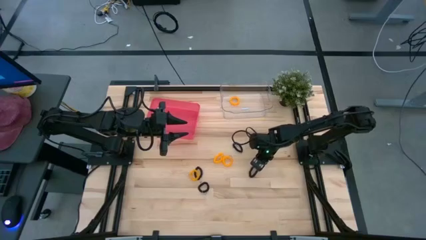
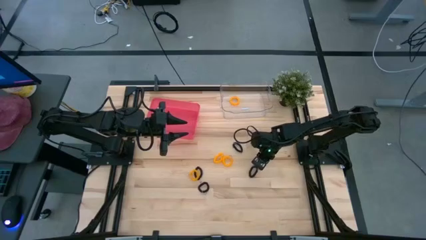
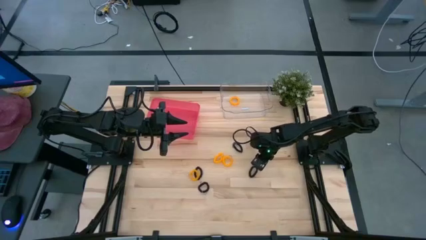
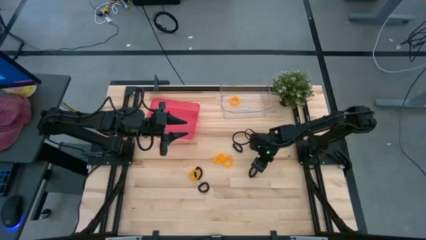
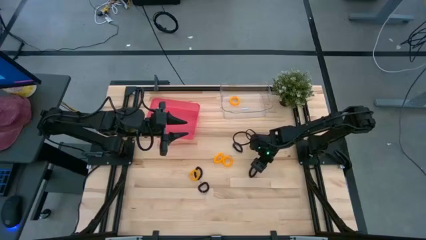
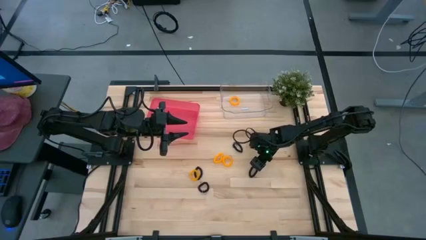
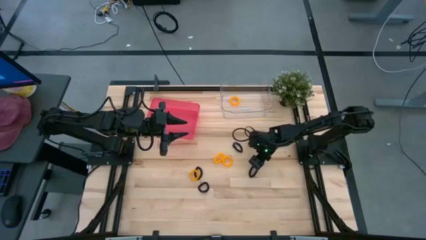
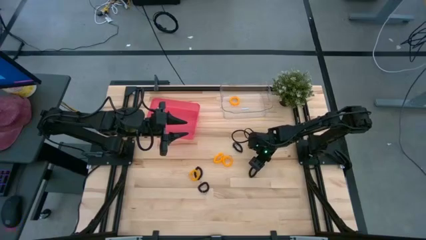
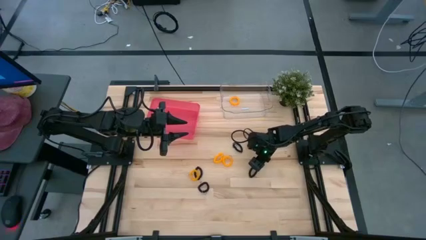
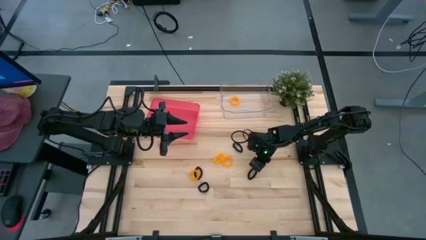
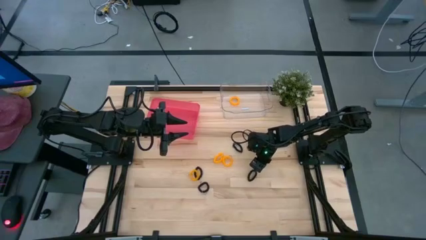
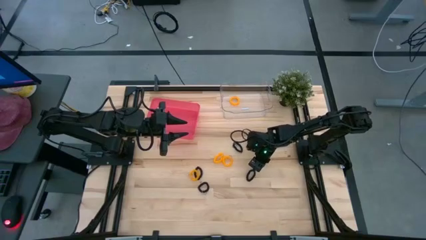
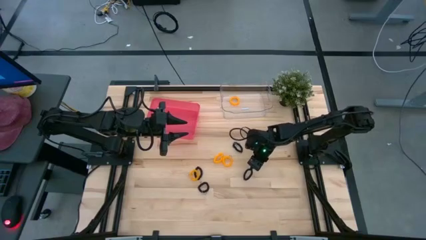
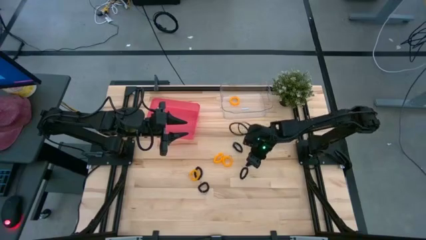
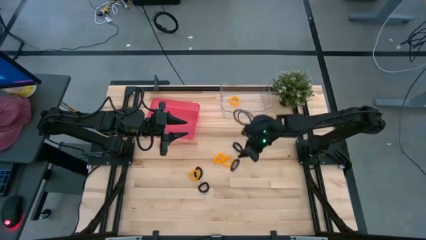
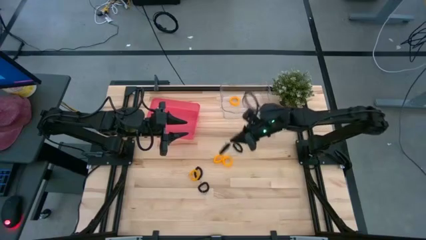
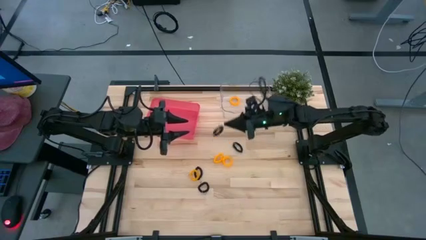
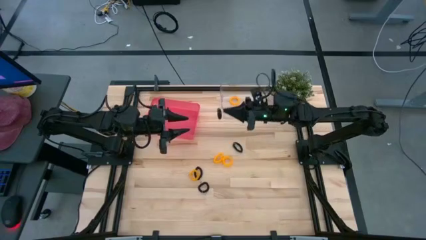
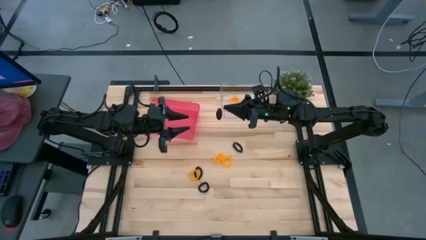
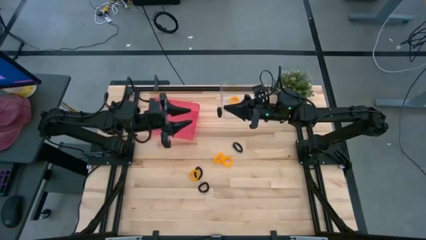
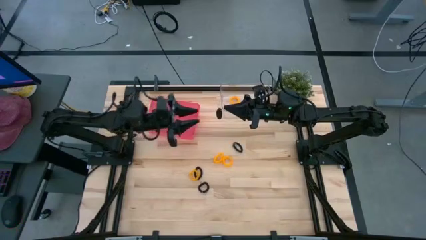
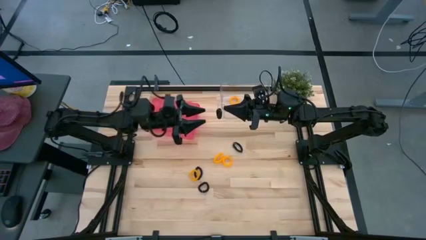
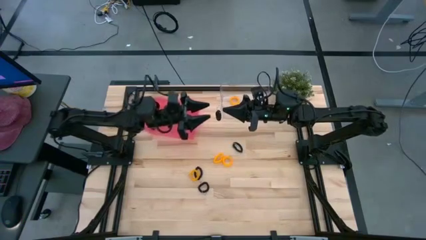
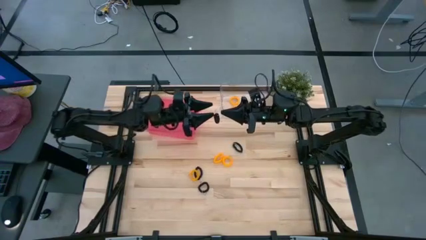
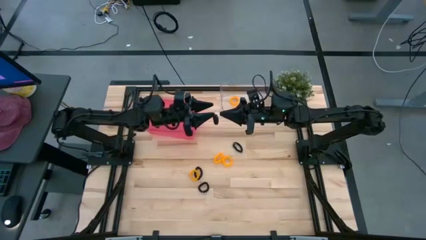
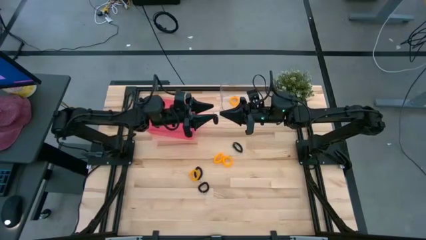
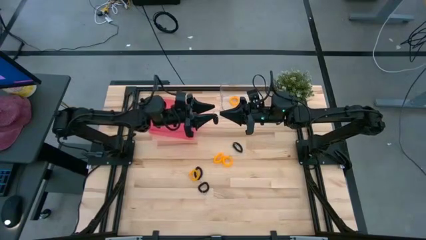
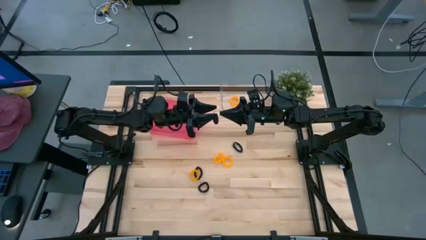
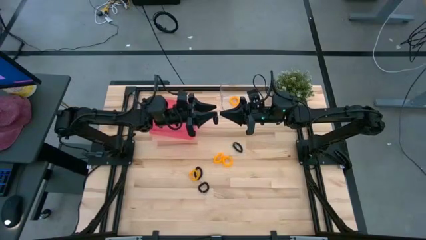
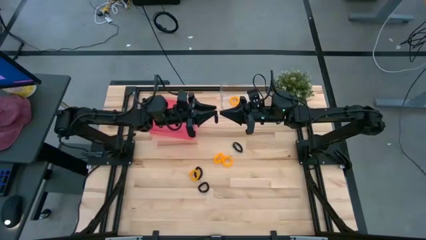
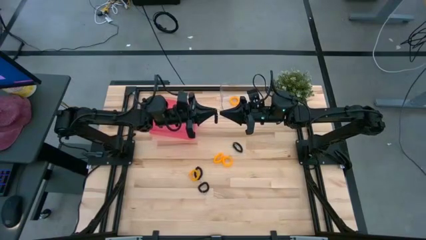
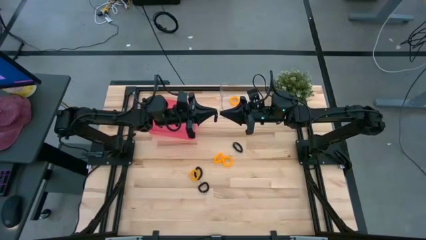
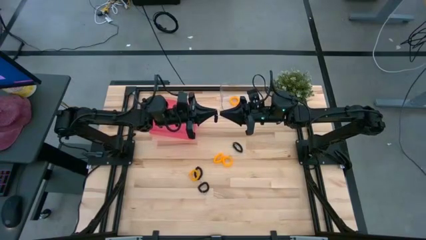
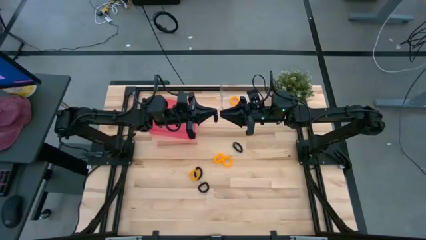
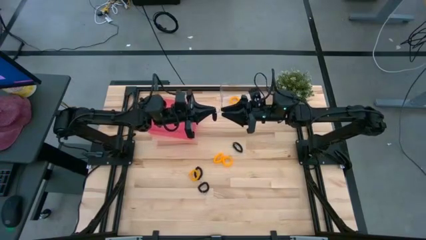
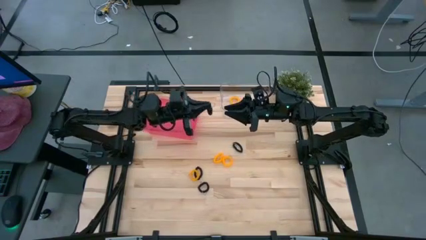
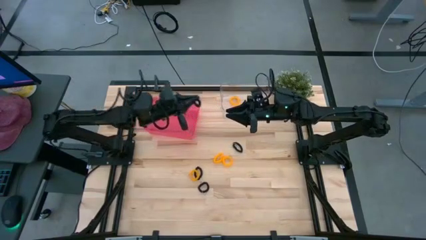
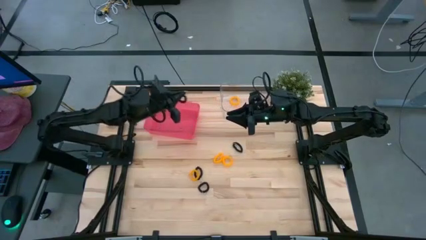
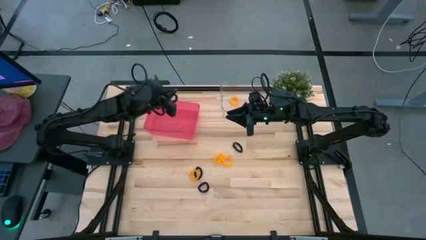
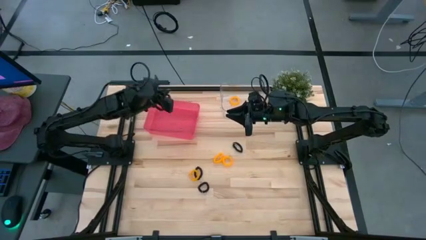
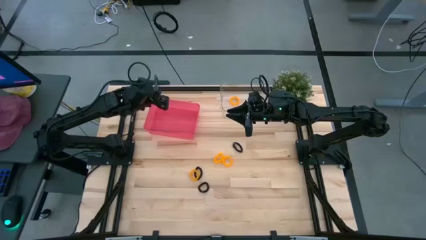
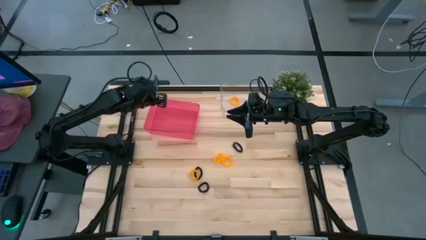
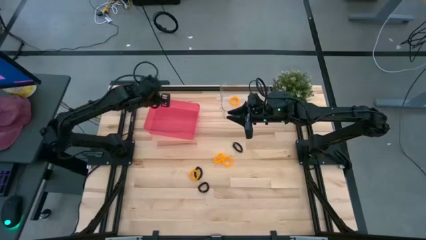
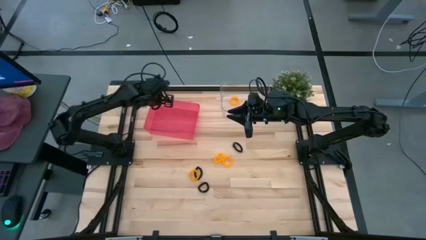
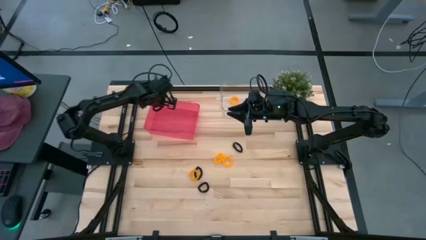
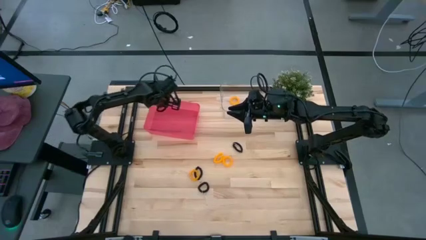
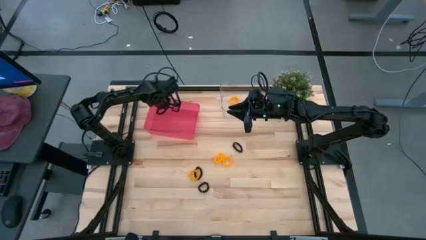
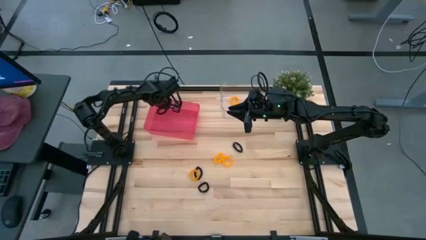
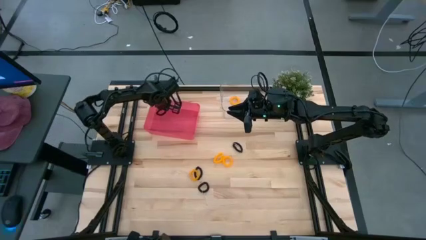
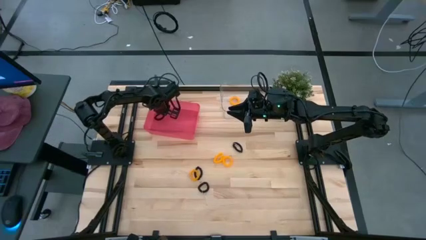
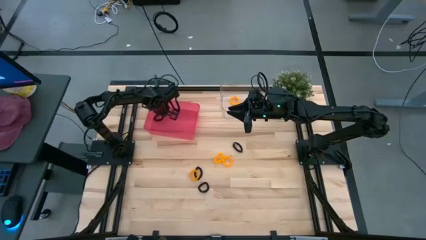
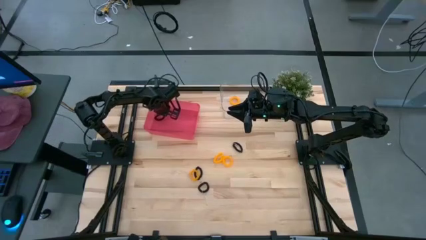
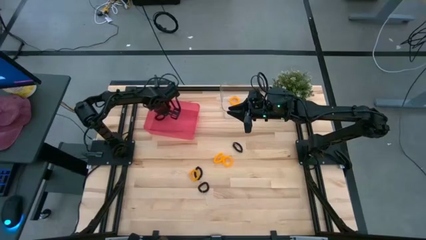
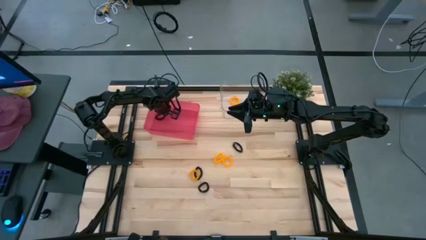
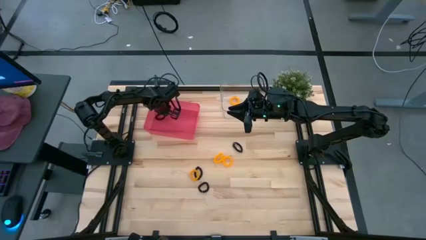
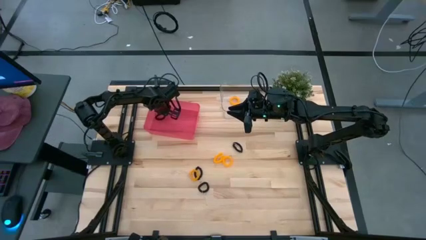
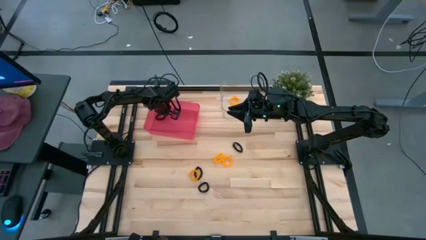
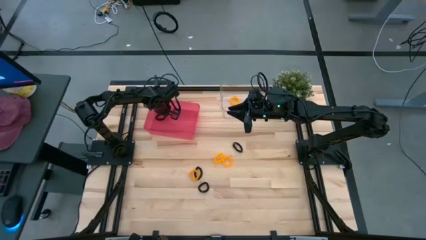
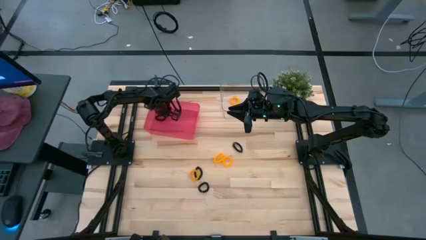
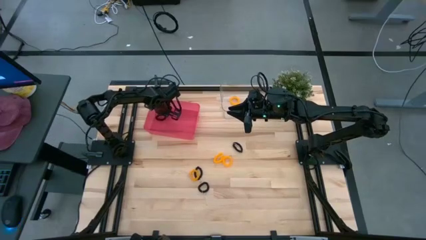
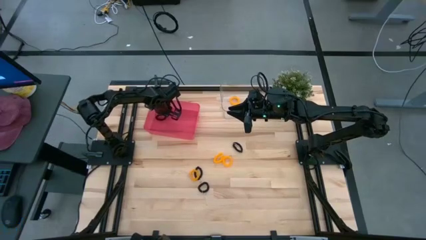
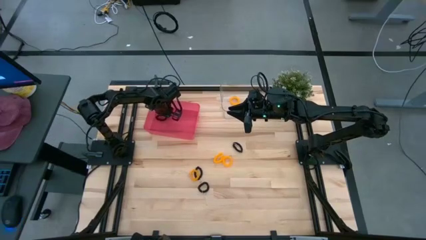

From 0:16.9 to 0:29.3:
Task: Sort spring keychains
Put the black spring keychain into the pink bin
